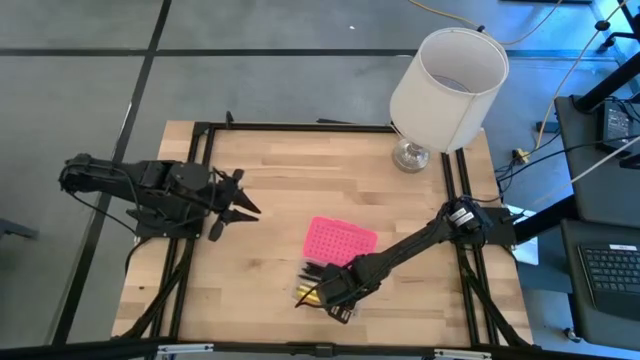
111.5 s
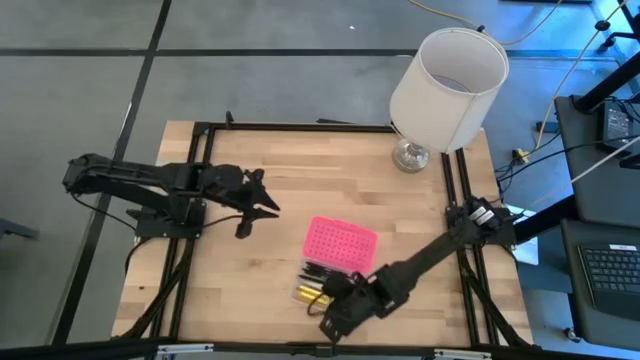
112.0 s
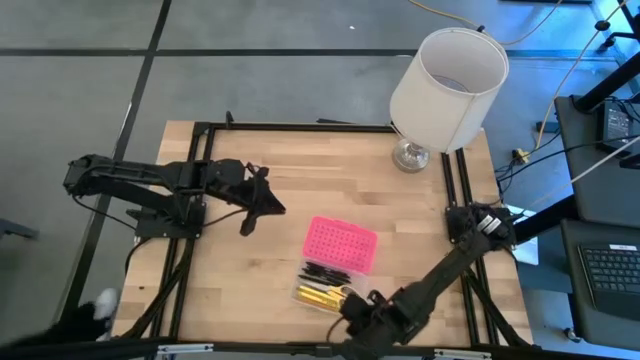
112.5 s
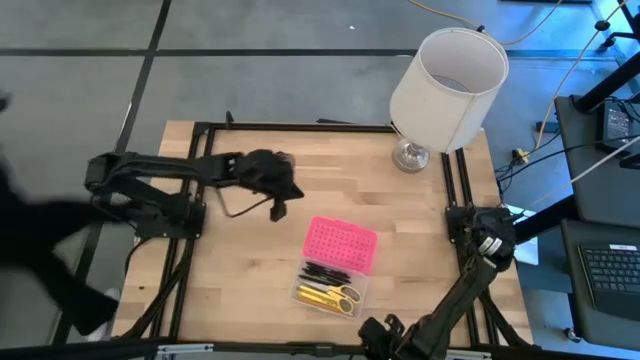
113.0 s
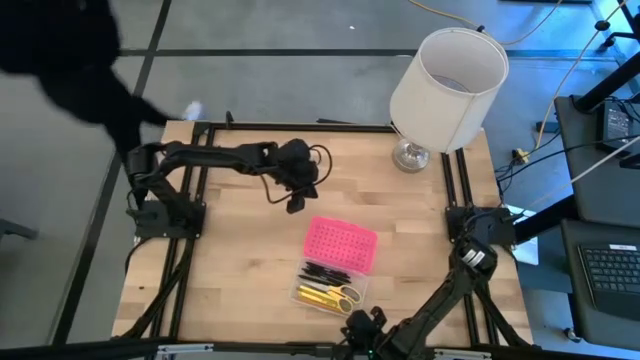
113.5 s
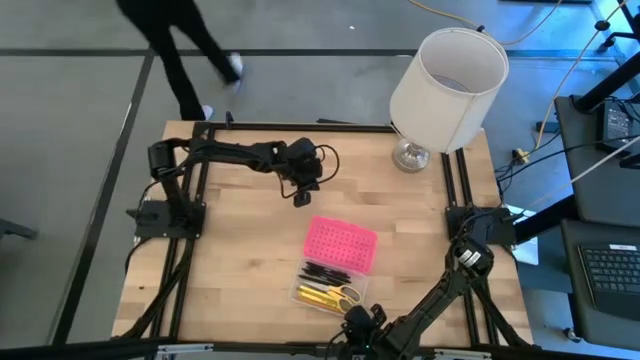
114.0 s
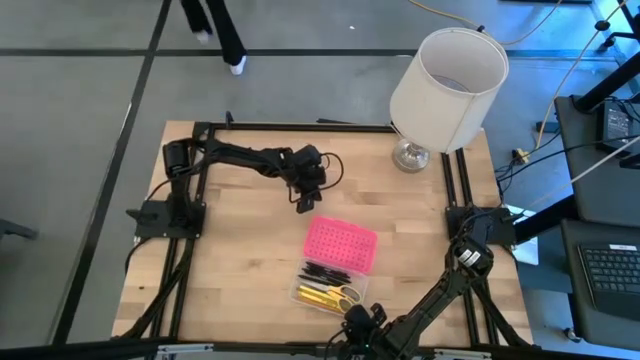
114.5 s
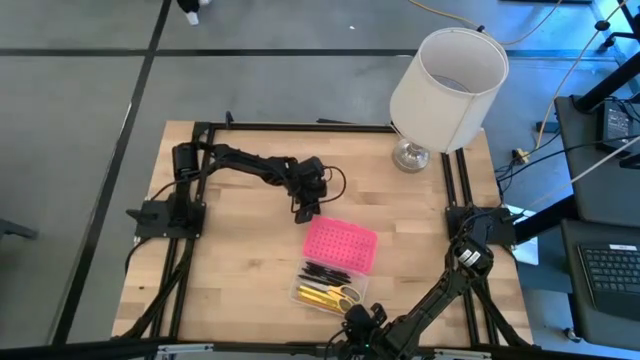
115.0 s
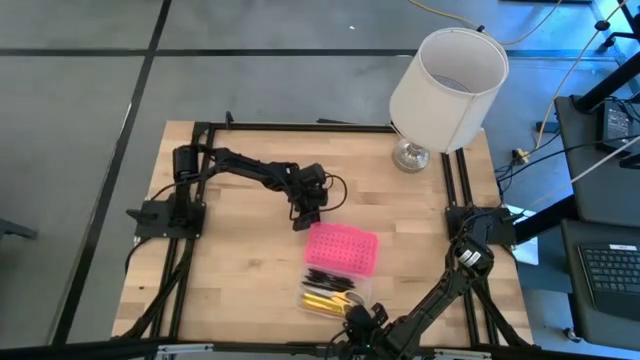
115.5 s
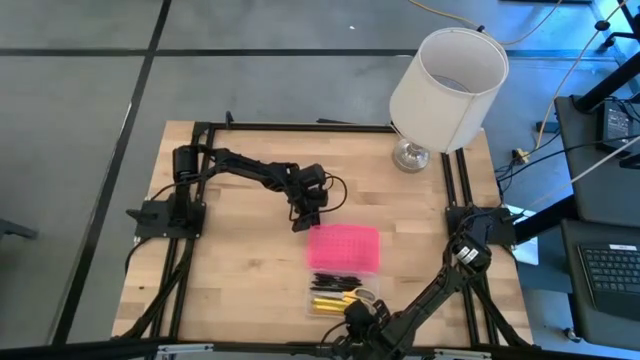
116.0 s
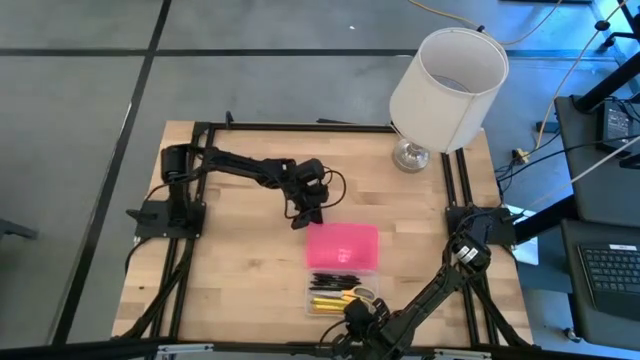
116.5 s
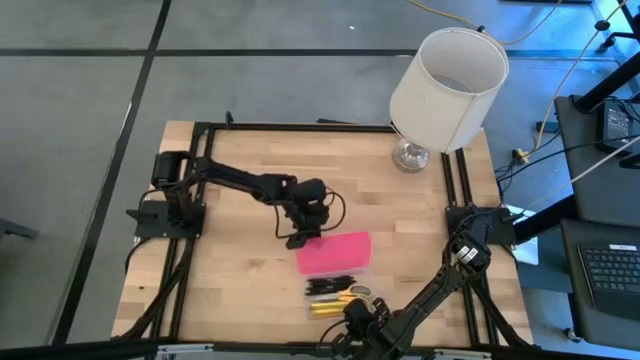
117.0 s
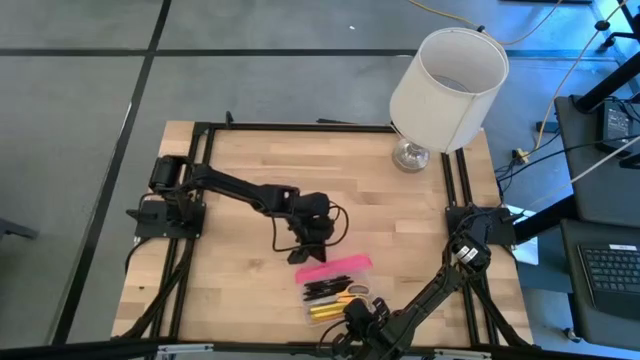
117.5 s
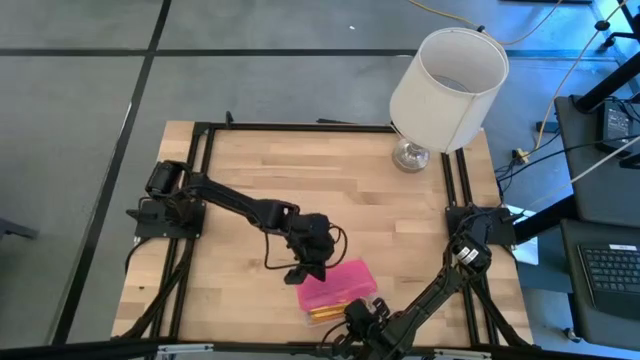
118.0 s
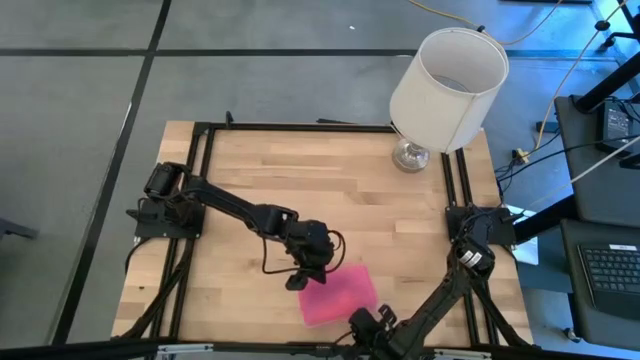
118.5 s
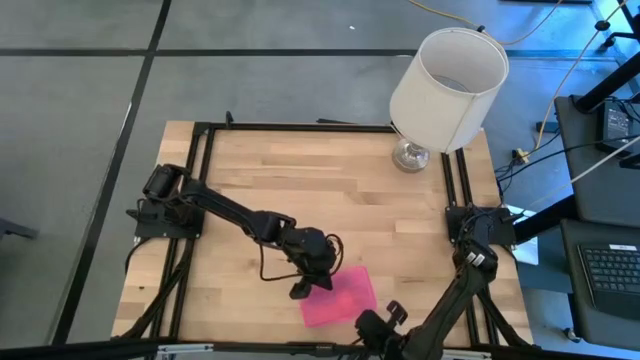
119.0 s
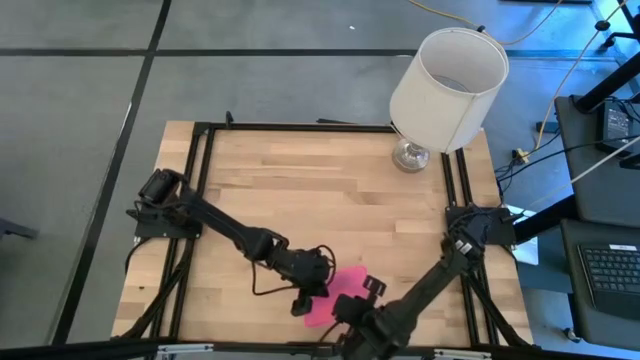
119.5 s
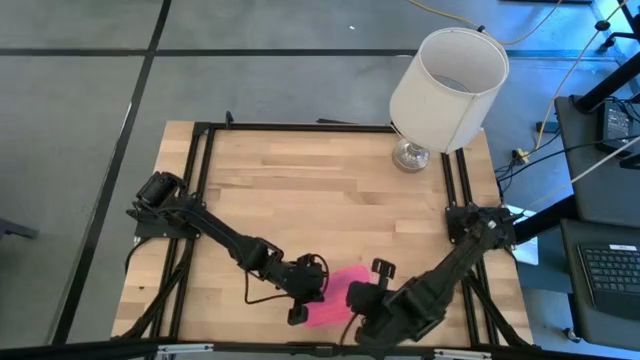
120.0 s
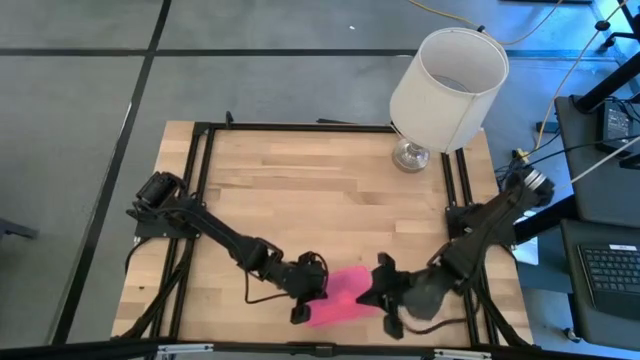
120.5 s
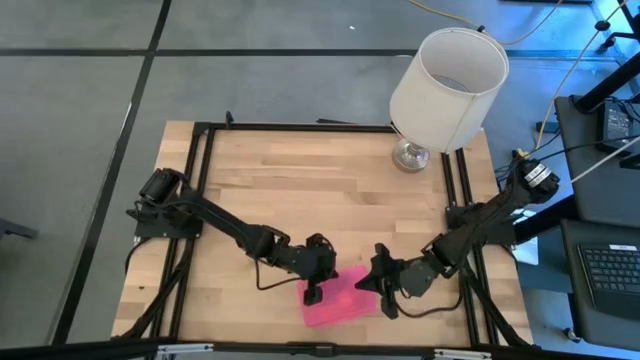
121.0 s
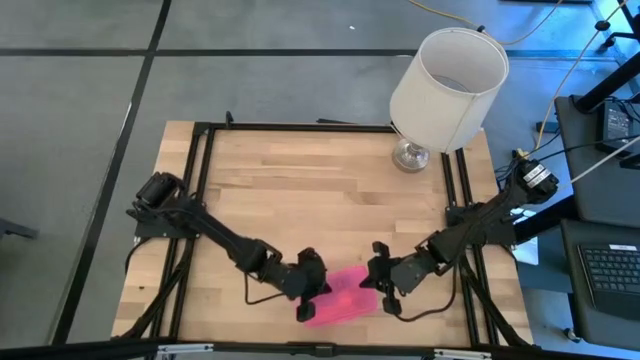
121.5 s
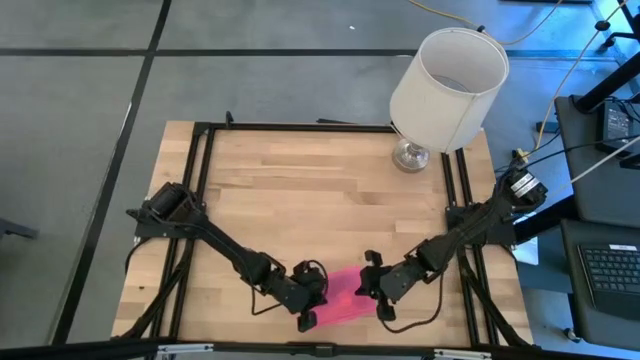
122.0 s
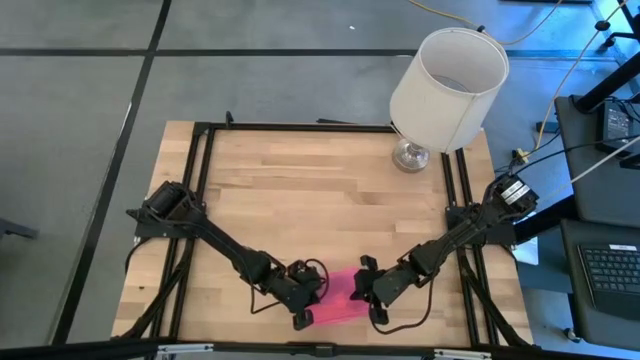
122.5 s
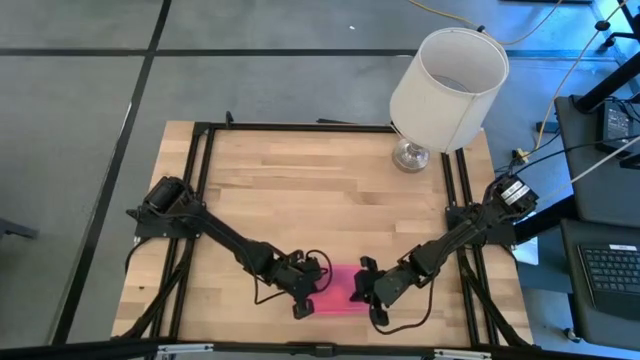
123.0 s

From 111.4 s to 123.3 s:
Task: Pick & place school supplies into a supply box
Close the pink supply box

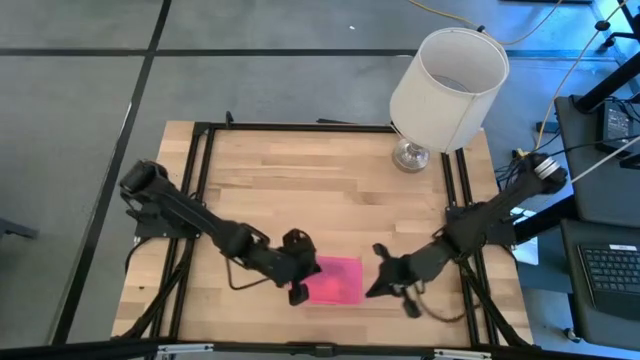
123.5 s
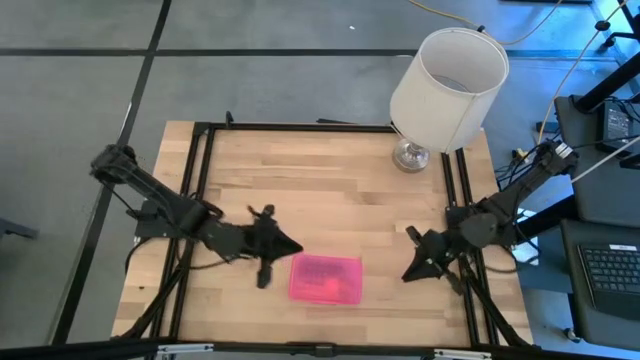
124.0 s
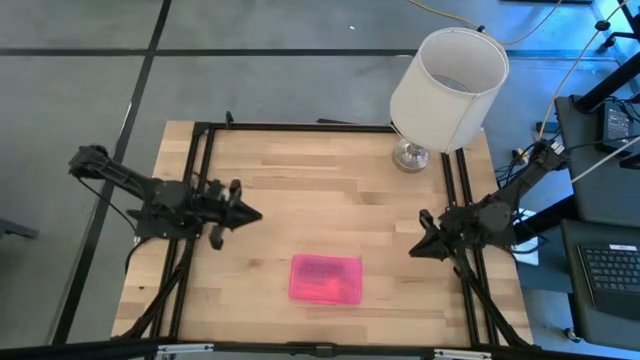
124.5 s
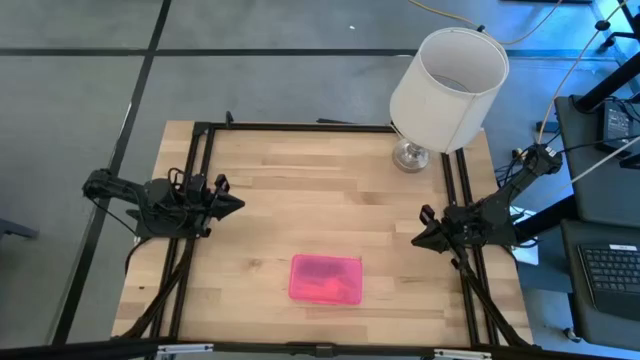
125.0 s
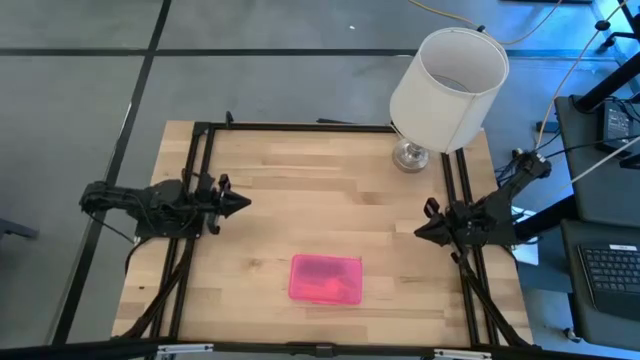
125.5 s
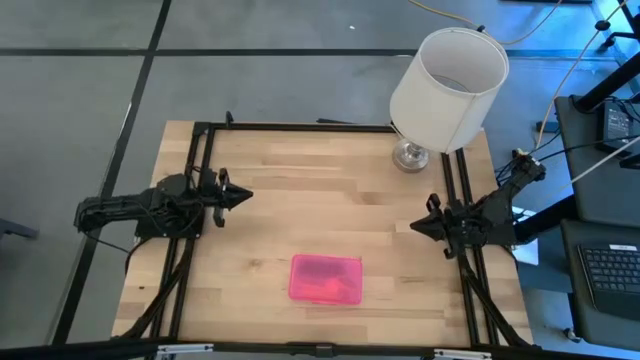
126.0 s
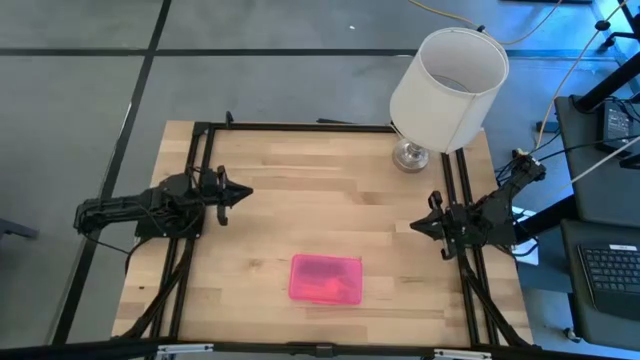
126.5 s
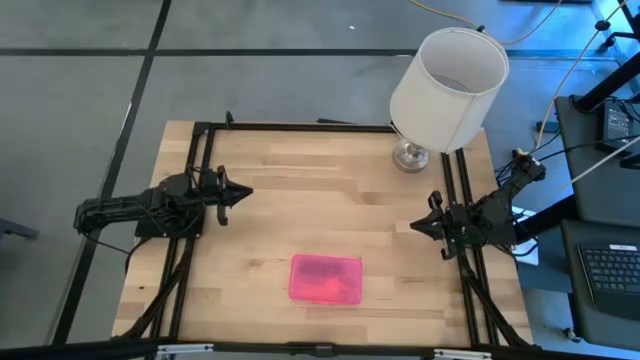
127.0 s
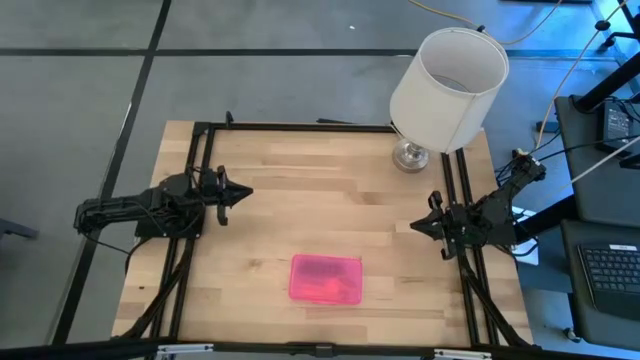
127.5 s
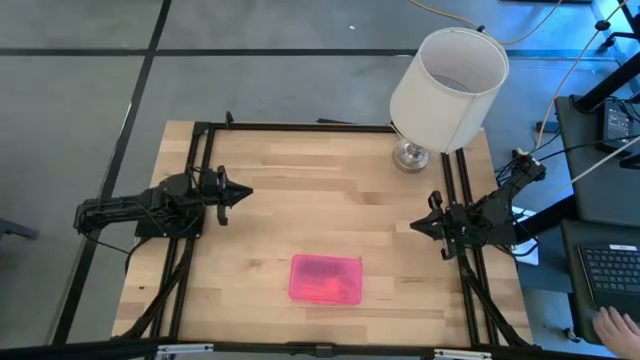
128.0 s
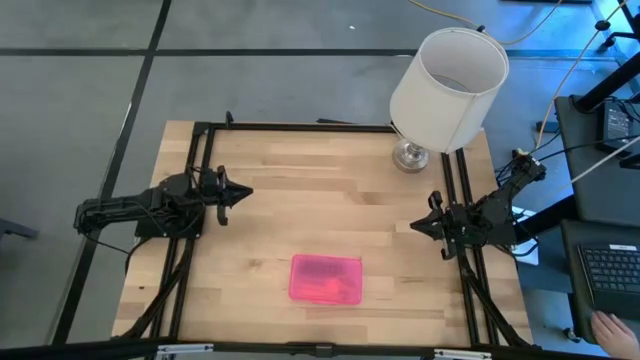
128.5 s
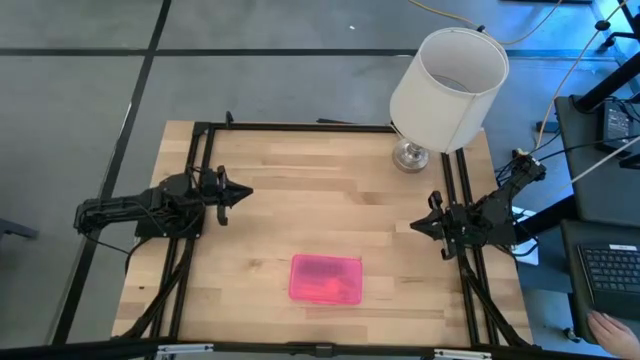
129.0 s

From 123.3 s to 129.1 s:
Return to Home Position

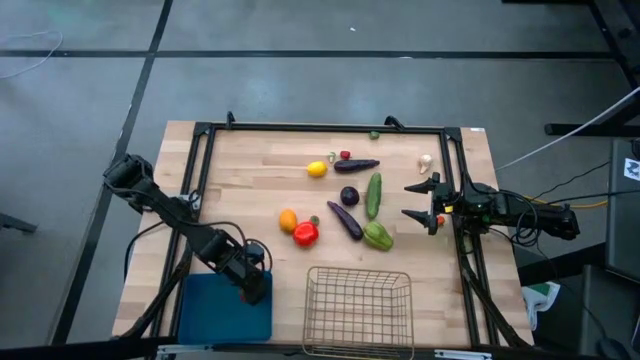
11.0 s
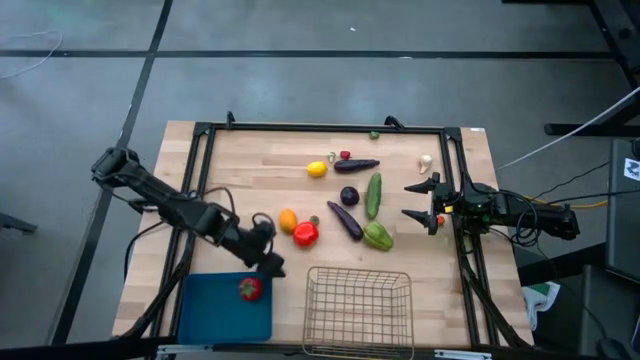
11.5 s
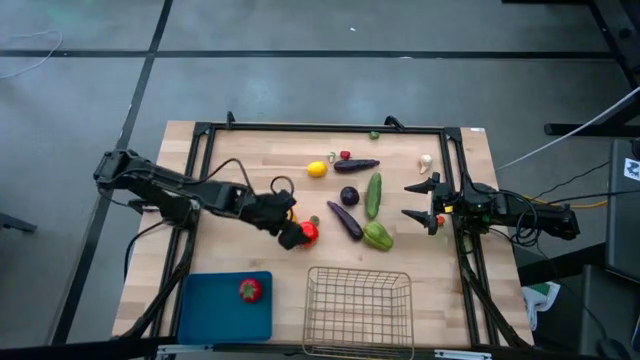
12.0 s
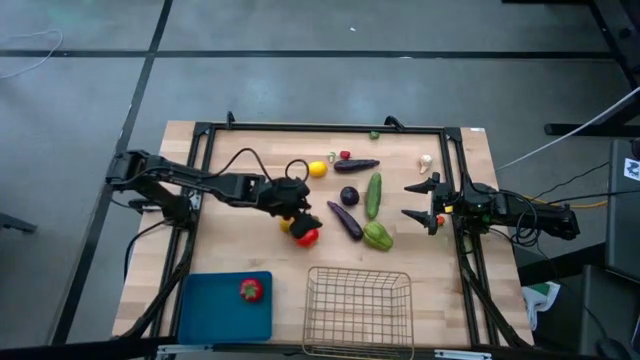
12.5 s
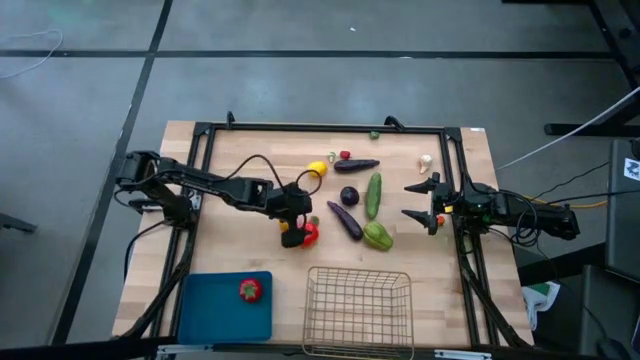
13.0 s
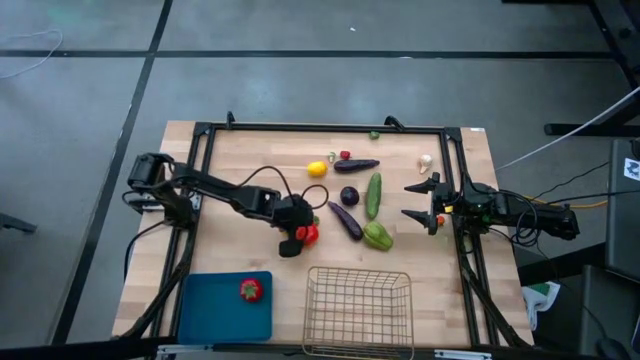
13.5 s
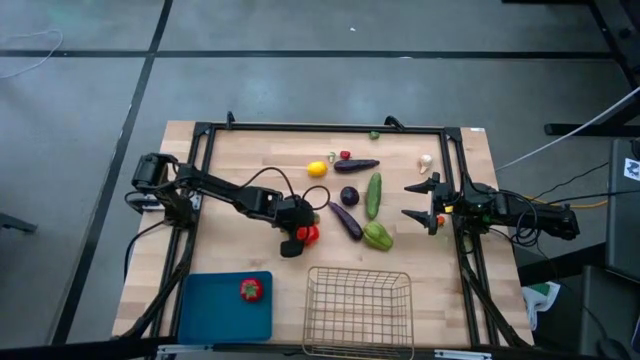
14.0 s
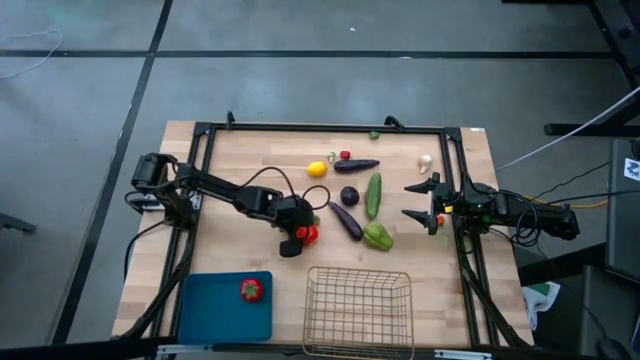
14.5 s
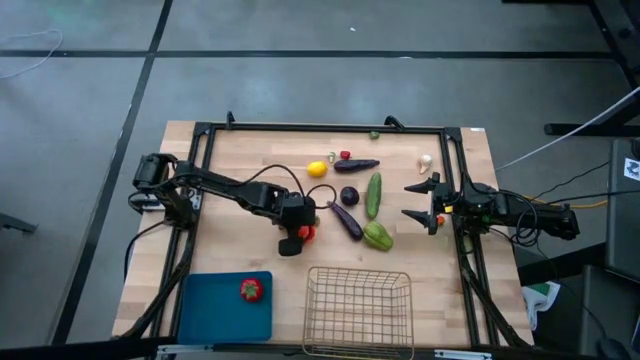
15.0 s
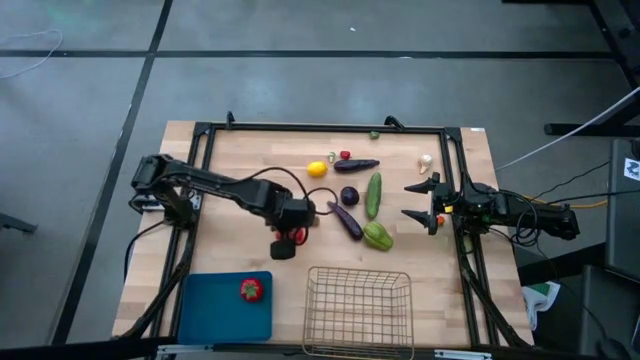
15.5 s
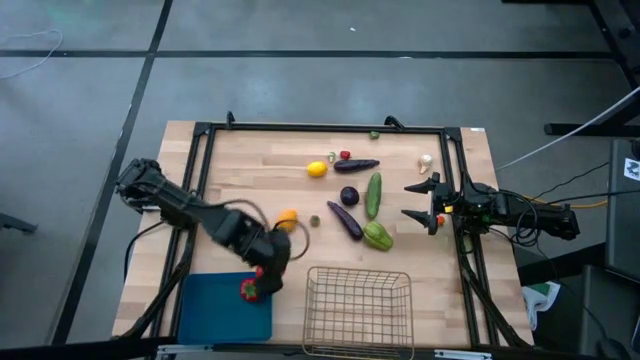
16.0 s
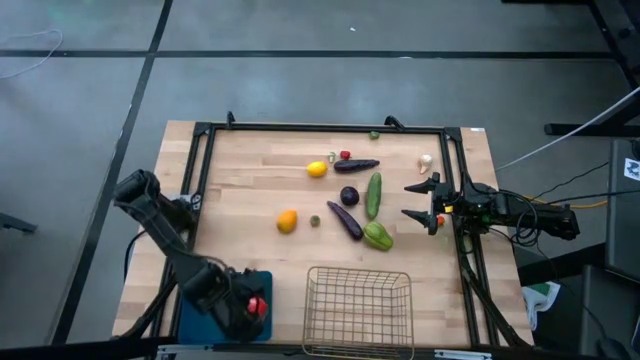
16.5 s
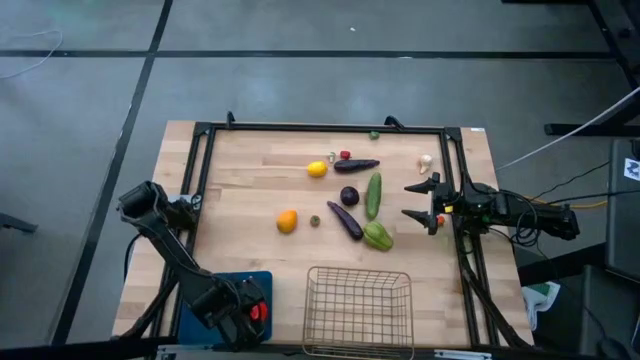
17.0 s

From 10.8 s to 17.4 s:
Task: Sort produce into baskets
Put the tomato into the blue bin
